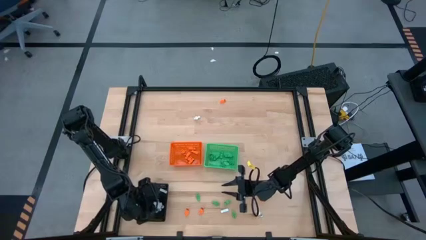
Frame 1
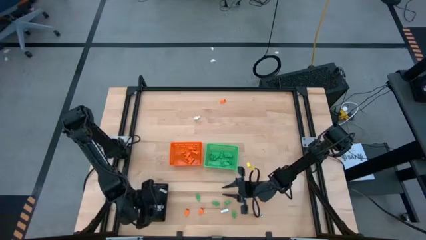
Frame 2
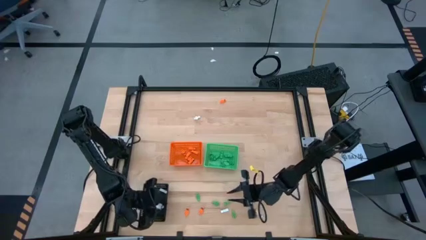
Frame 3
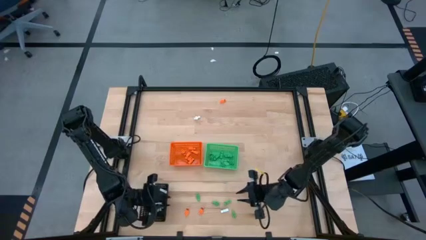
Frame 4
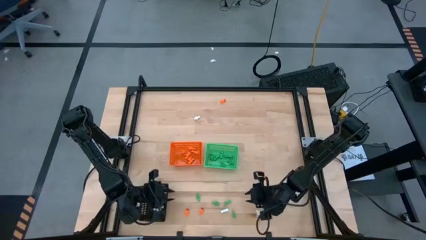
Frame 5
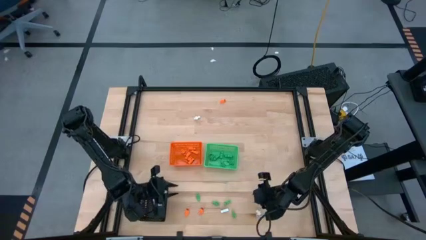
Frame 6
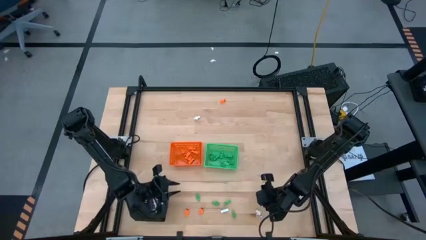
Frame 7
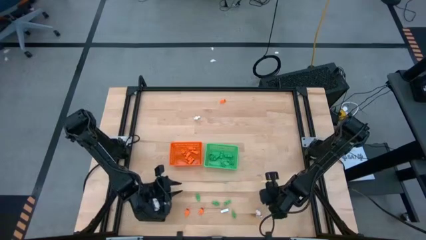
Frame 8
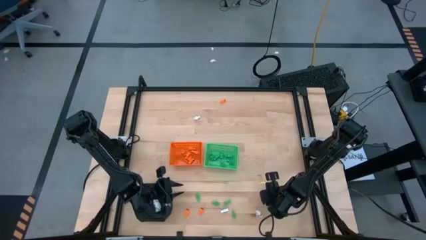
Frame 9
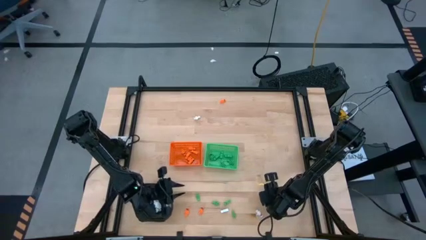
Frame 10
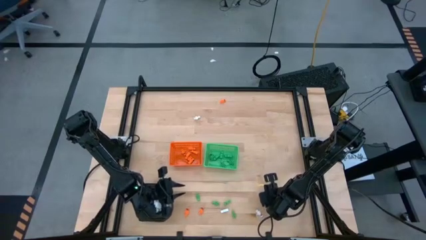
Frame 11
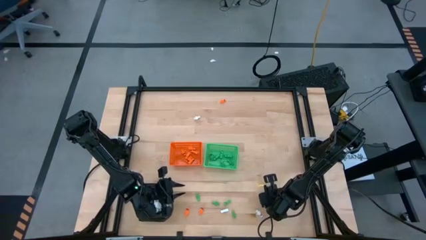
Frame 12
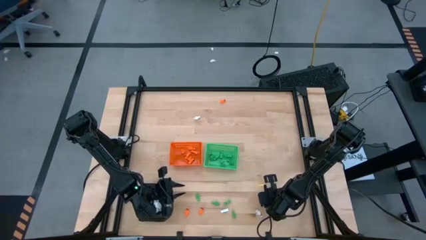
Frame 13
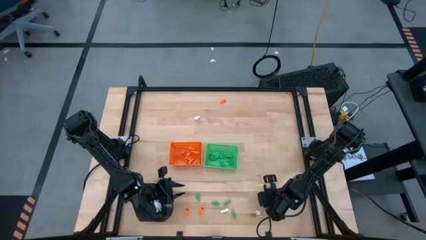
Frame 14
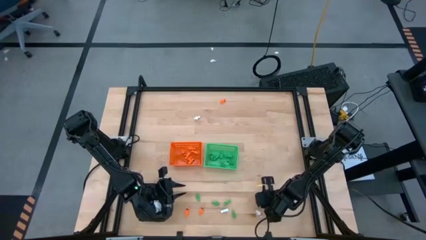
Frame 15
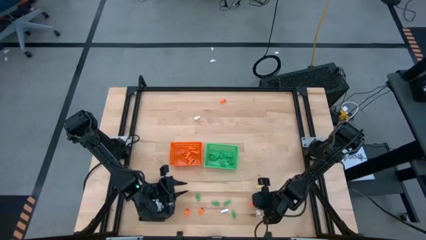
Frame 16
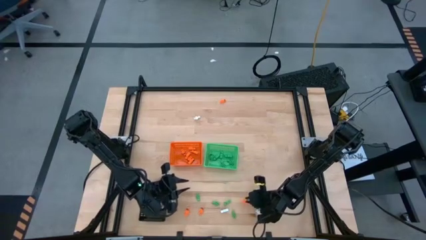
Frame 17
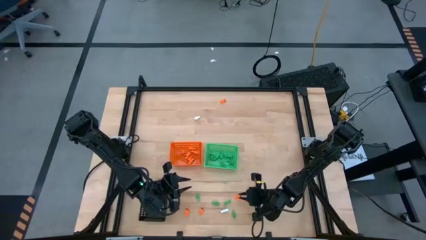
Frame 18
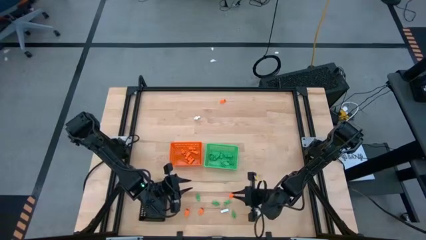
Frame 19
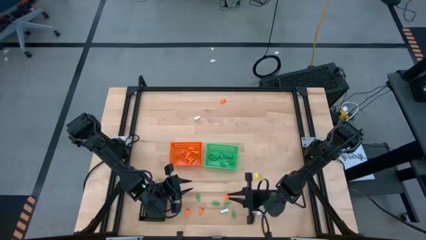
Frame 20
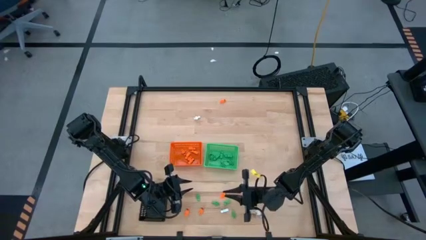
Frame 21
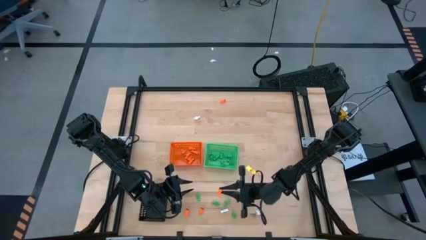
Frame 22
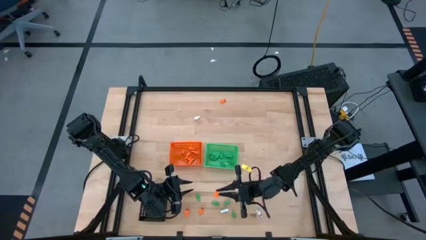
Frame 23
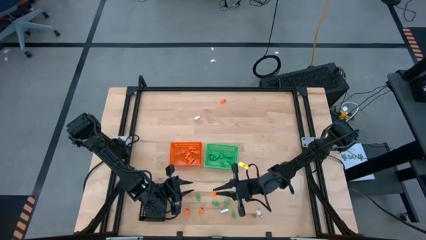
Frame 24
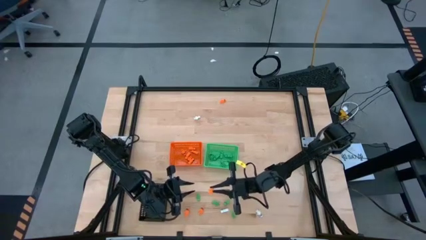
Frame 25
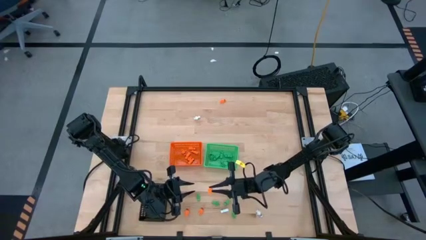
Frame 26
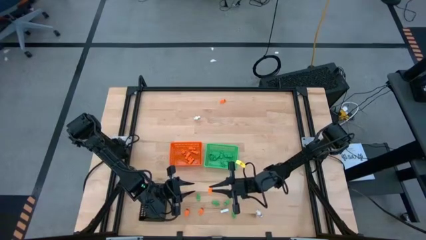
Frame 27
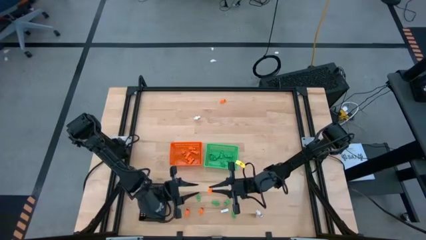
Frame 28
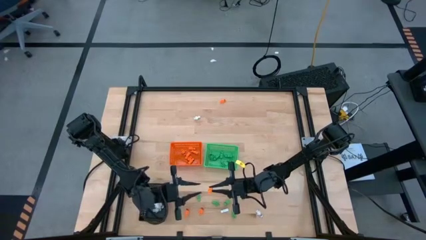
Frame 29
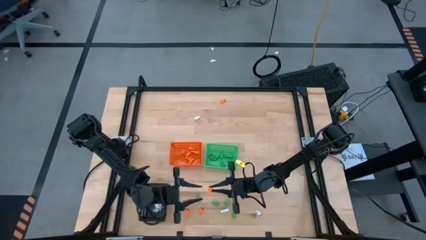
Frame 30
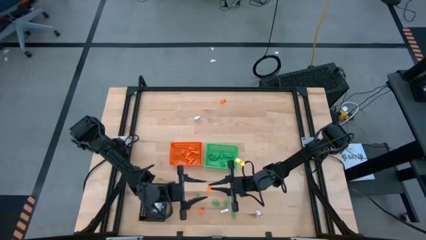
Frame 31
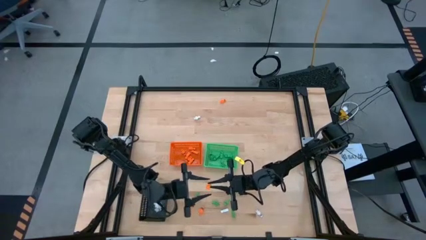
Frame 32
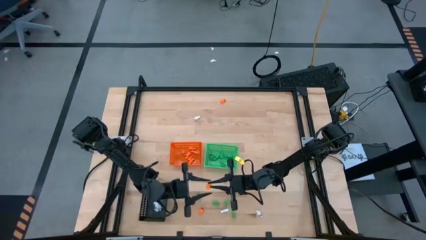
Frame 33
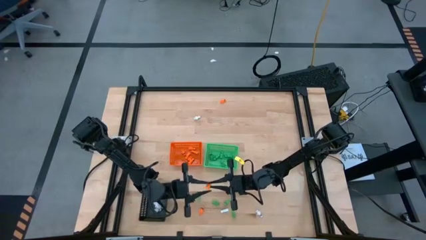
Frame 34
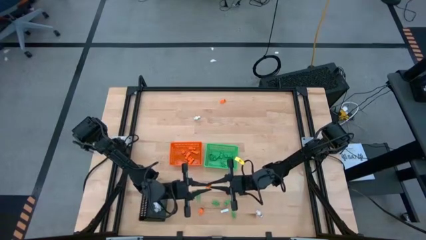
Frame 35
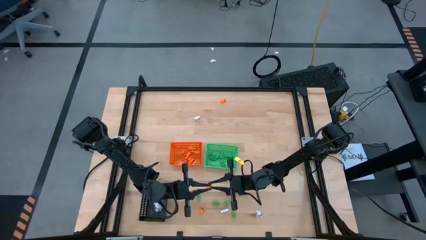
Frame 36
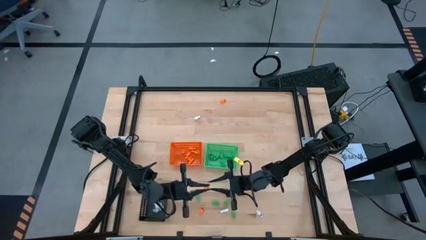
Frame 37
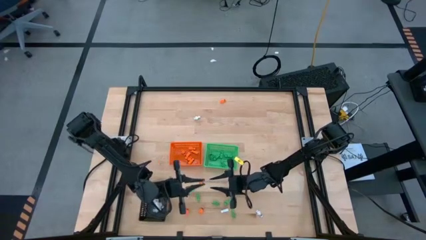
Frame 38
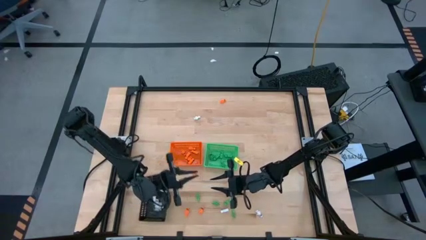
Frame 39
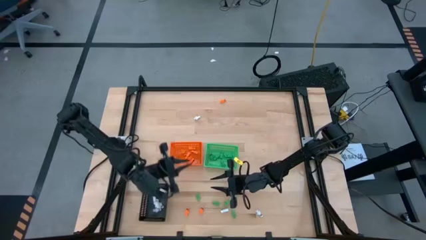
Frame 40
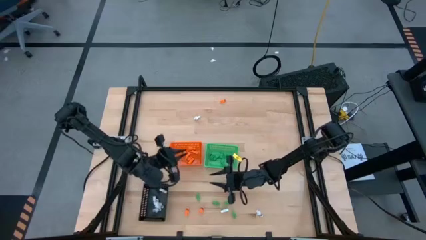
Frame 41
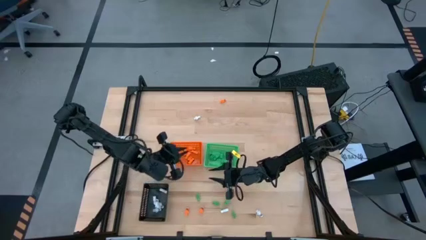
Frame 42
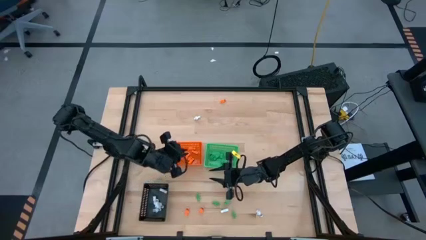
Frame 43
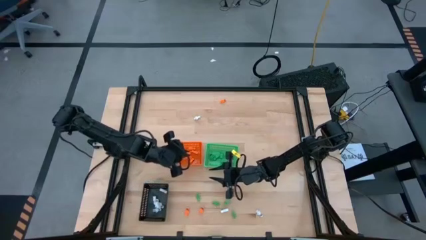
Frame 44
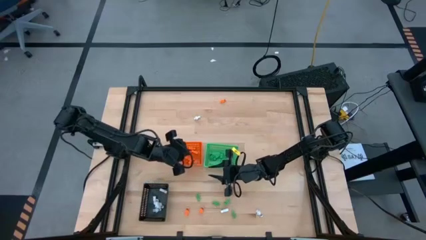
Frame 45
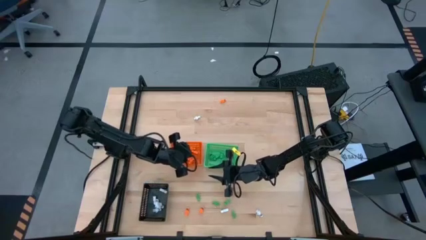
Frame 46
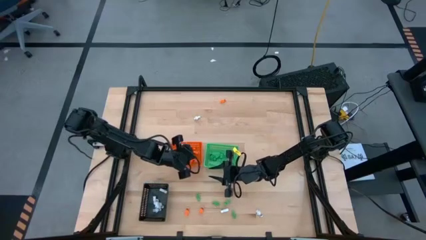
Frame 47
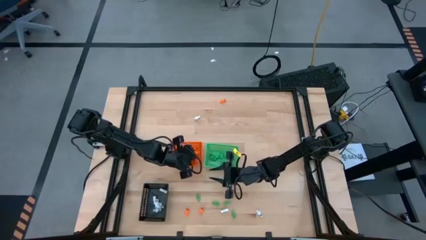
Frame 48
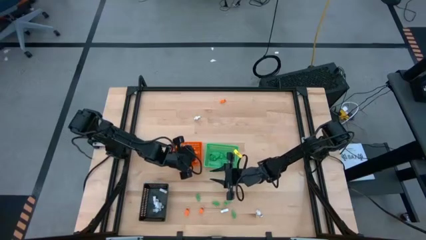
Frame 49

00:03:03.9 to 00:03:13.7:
Task: Sort Halloween decoration
Put the orange skeleton toy into the orange bin

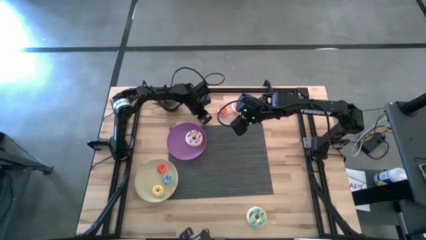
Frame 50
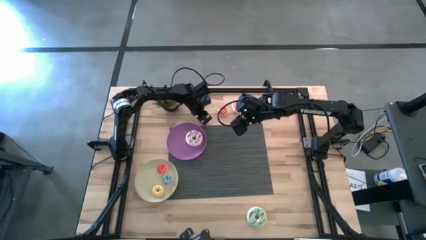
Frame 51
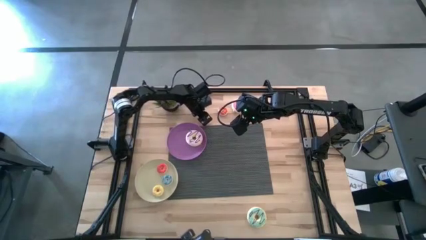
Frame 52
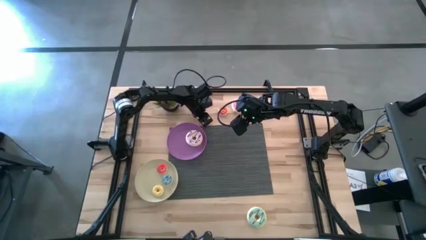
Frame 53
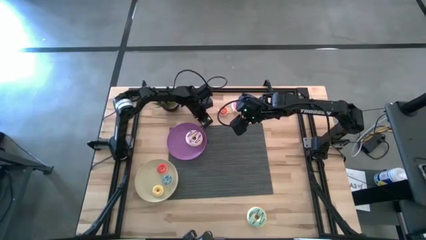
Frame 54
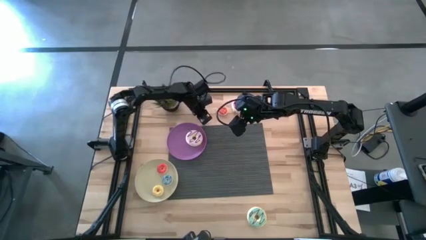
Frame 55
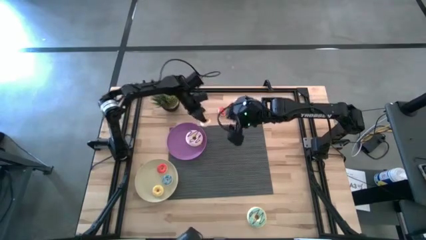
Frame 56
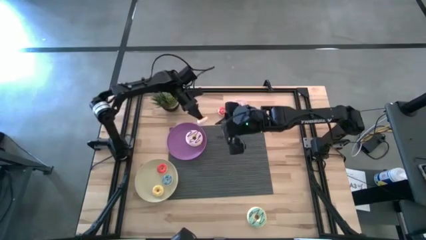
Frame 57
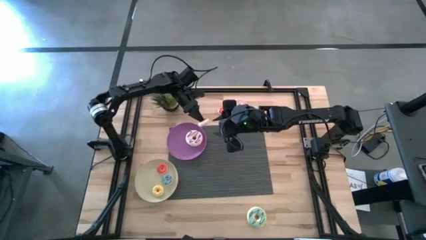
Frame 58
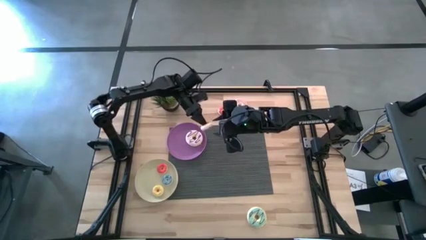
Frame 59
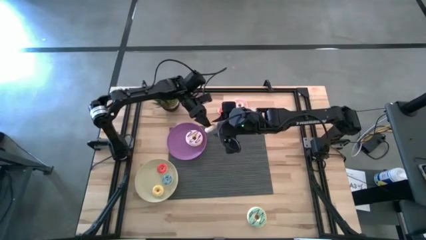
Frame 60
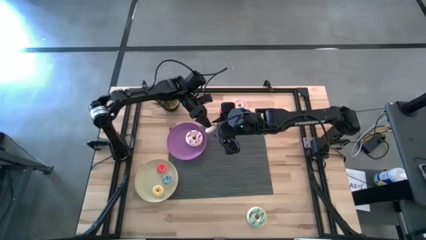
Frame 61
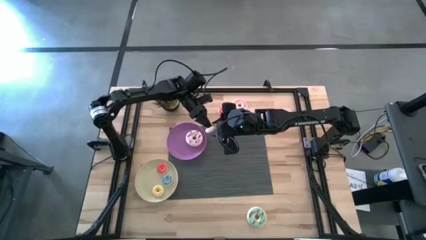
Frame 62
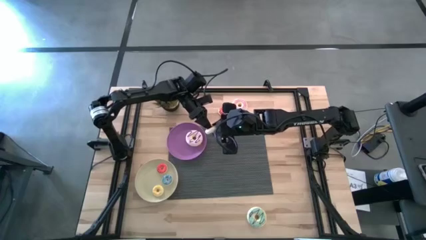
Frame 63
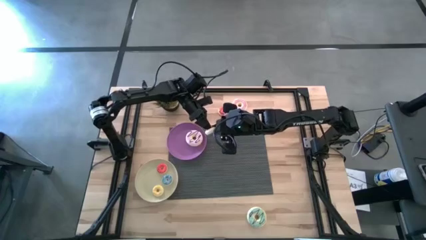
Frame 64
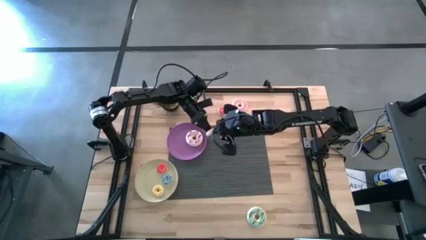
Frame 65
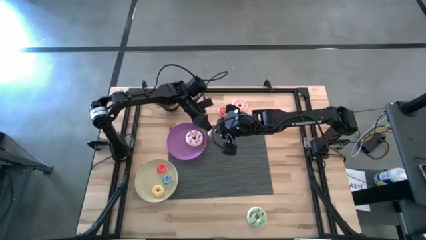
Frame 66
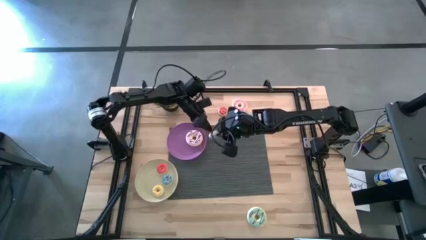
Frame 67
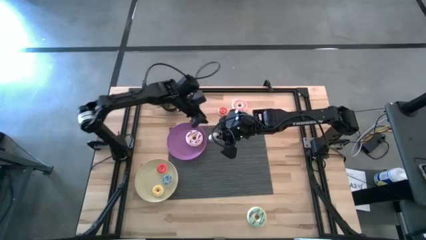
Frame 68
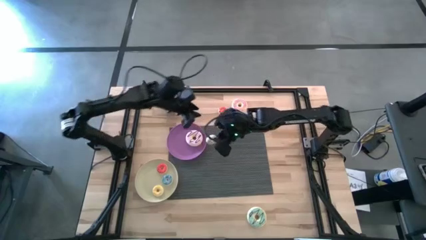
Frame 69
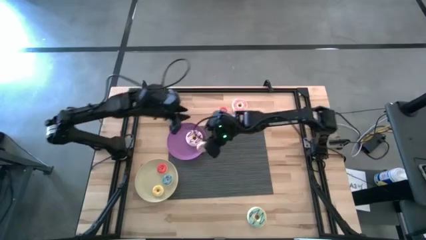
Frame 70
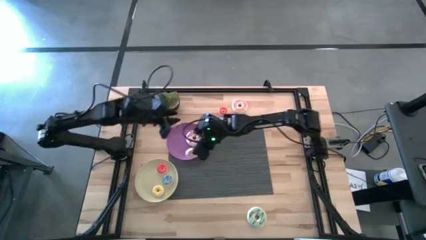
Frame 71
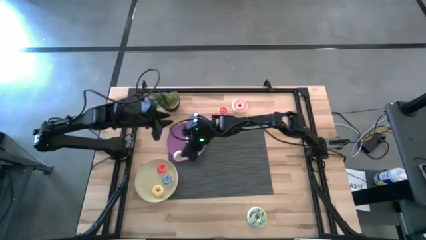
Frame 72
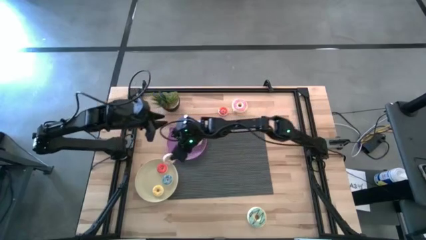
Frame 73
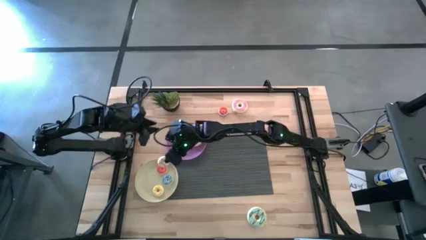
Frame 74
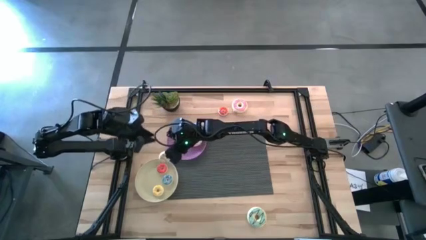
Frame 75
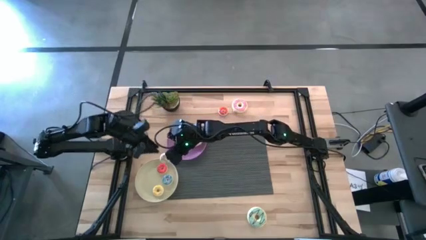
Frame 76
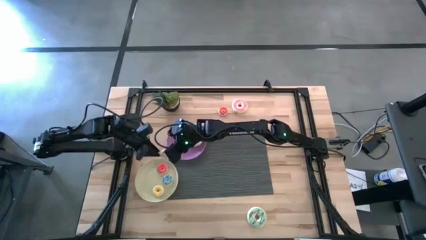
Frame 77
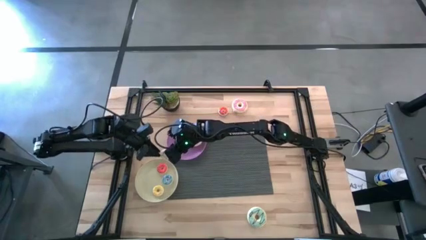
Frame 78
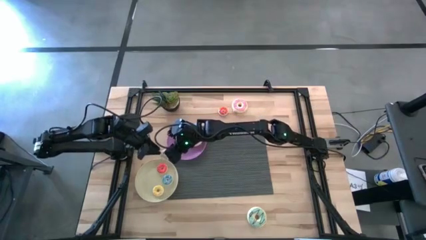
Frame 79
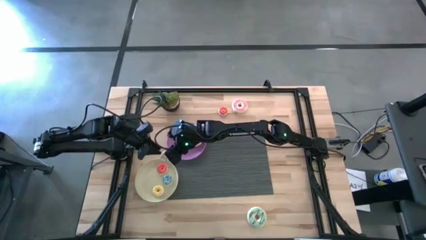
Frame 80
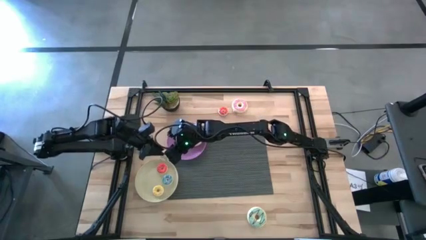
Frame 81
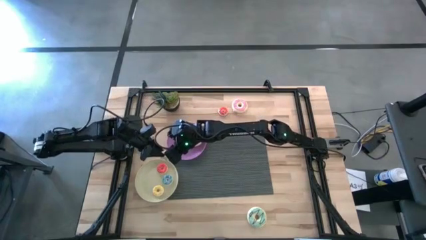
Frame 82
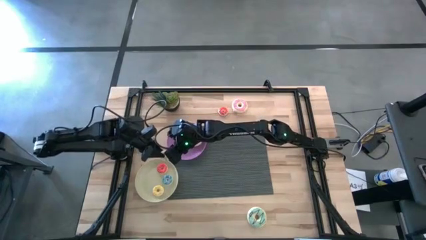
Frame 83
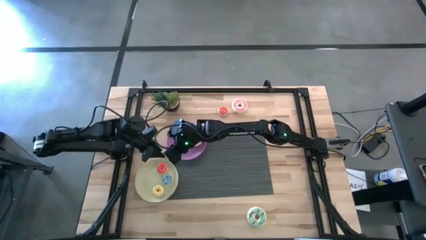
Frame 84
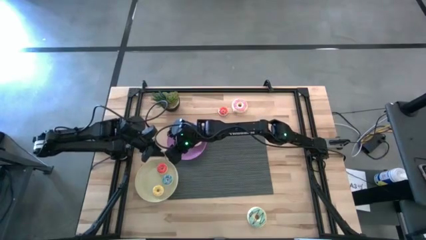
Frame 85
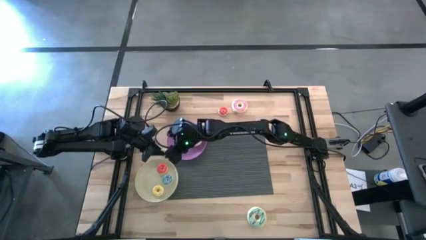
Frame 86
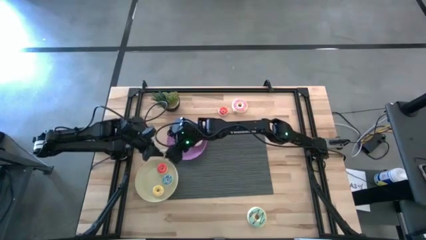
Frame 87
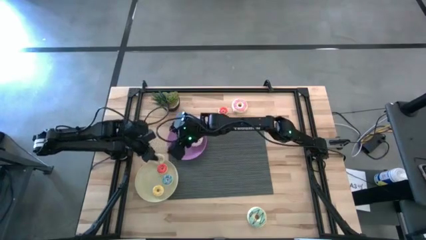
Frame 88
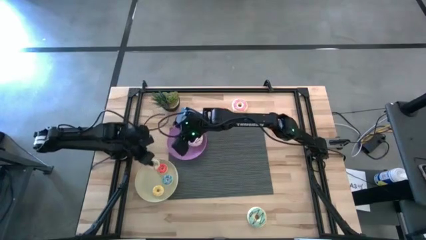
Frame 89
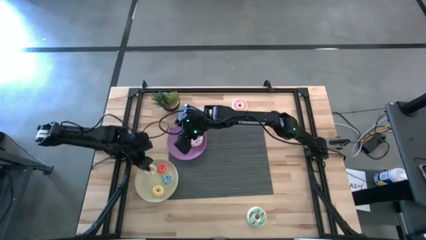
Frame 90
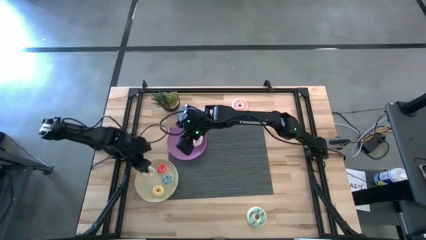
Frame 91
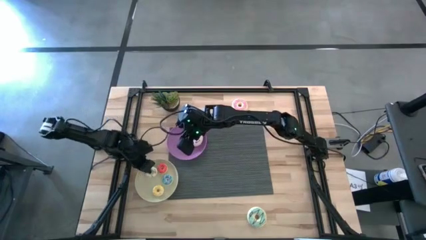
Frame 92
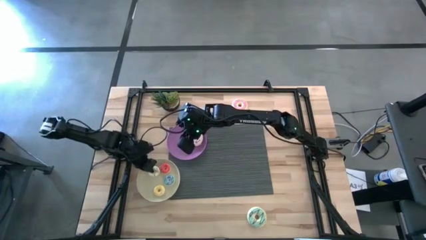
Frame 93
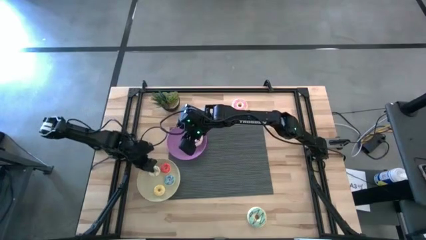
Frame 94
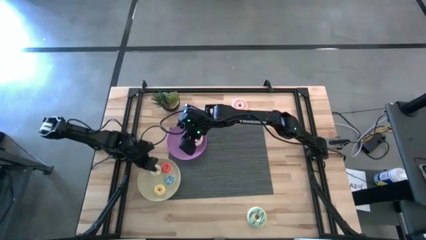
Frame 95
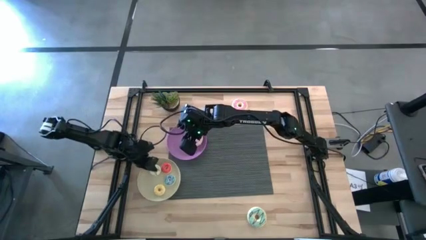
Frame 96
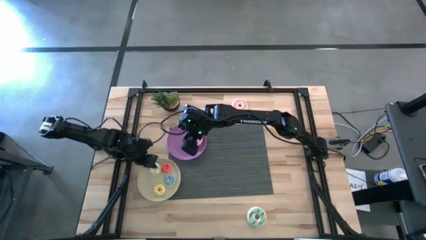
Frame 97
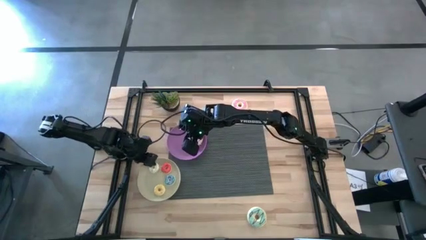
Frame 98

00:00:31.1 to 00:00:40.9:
Task: Pick & Place donuts
Put the small white donut on the gray plate
